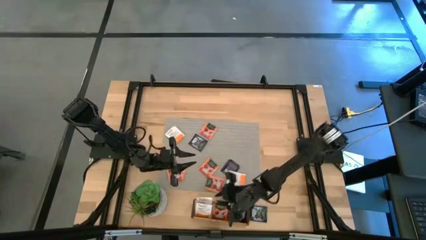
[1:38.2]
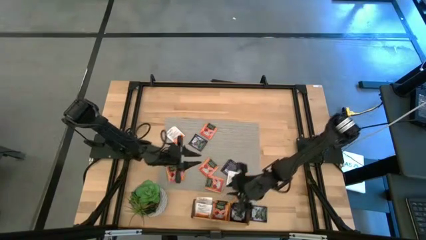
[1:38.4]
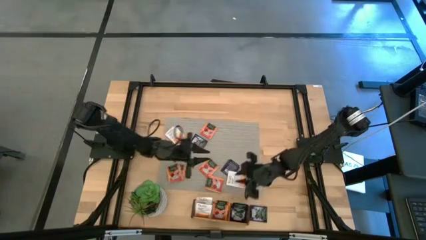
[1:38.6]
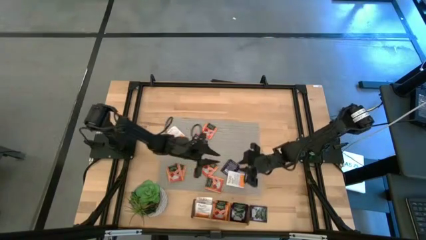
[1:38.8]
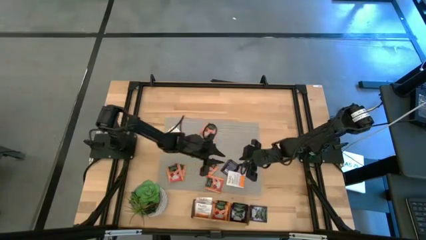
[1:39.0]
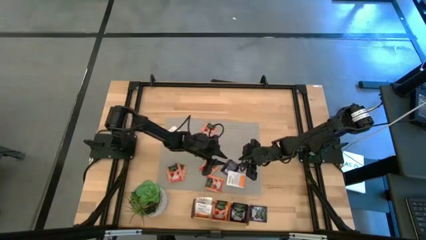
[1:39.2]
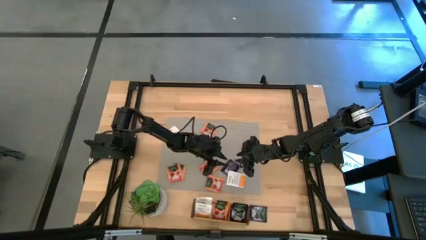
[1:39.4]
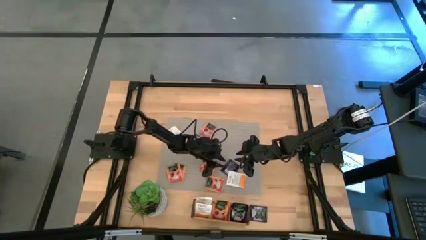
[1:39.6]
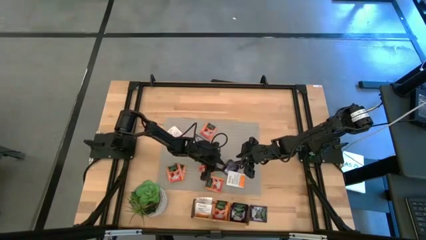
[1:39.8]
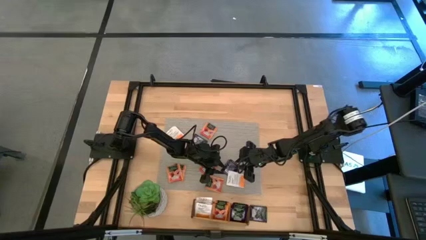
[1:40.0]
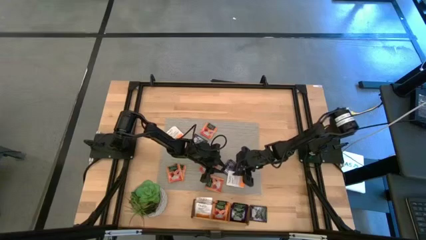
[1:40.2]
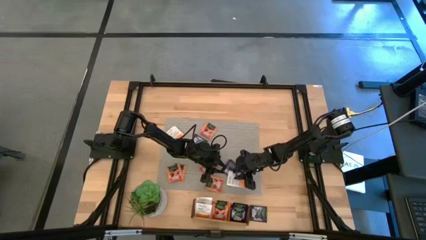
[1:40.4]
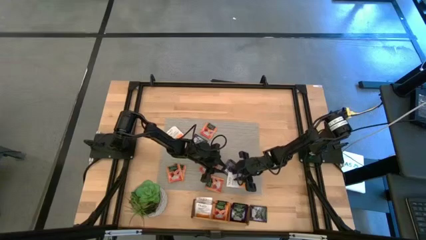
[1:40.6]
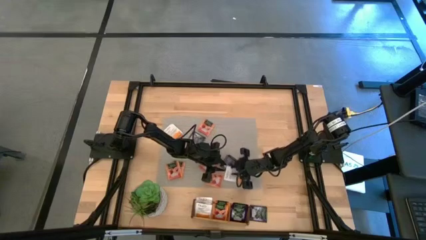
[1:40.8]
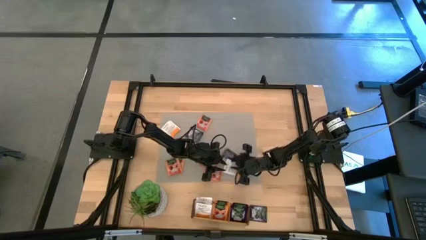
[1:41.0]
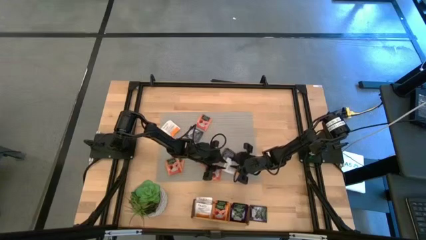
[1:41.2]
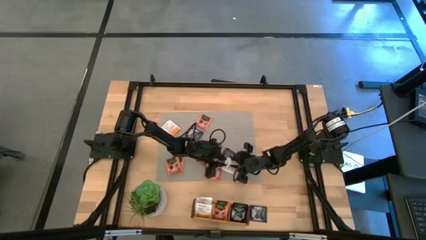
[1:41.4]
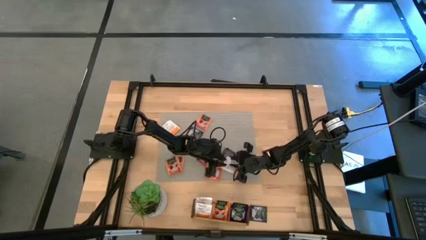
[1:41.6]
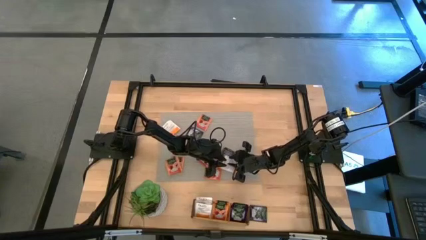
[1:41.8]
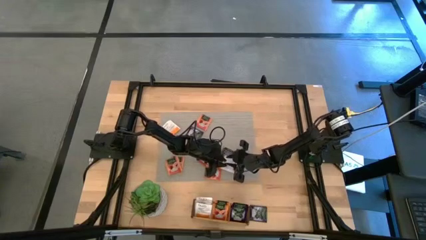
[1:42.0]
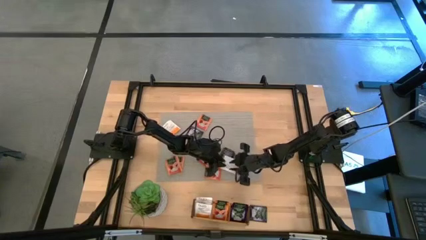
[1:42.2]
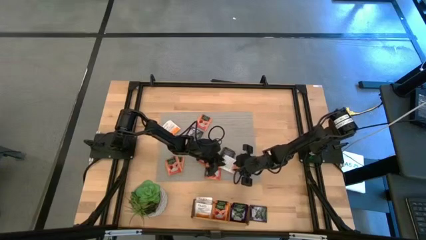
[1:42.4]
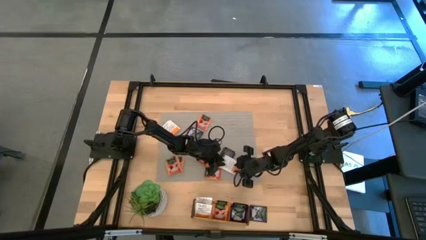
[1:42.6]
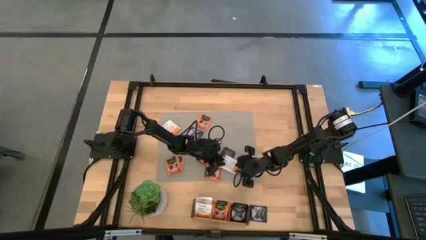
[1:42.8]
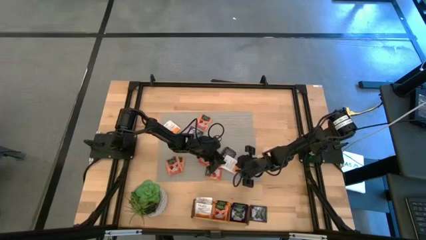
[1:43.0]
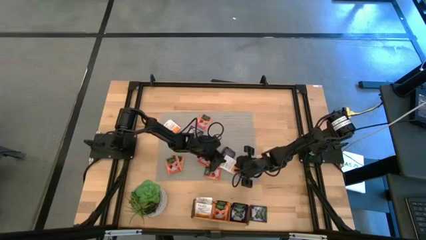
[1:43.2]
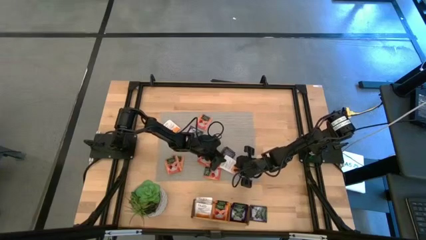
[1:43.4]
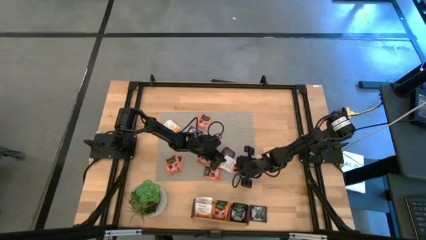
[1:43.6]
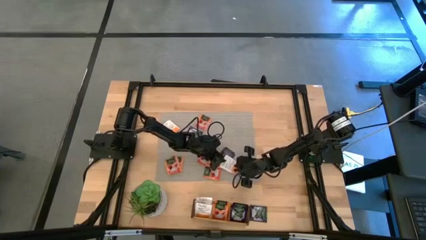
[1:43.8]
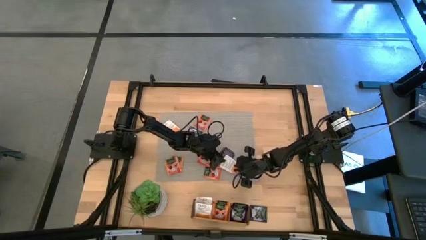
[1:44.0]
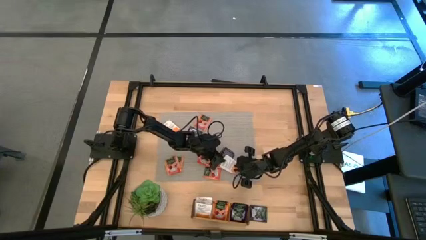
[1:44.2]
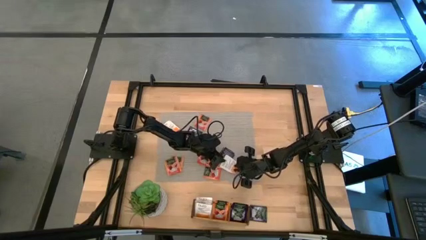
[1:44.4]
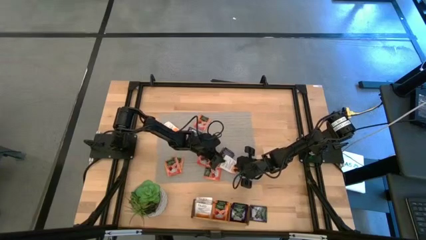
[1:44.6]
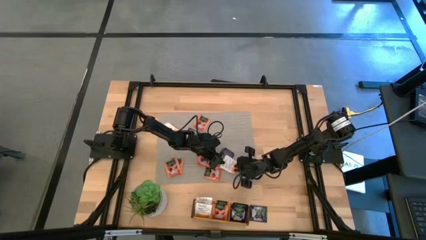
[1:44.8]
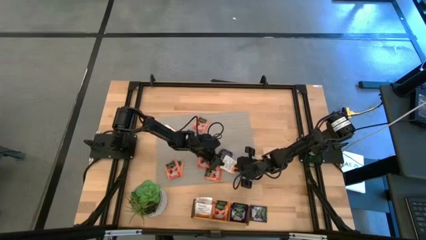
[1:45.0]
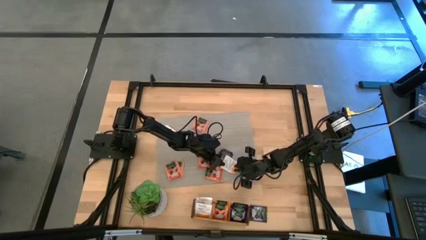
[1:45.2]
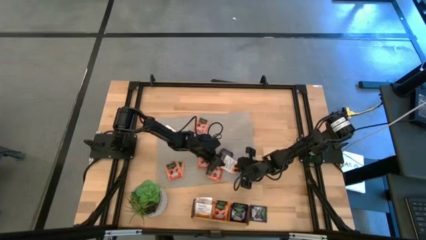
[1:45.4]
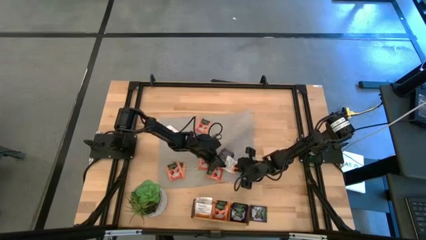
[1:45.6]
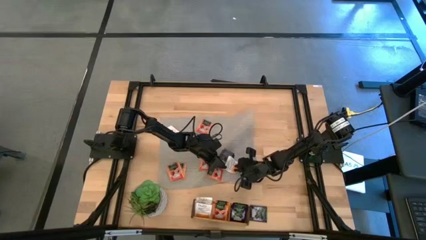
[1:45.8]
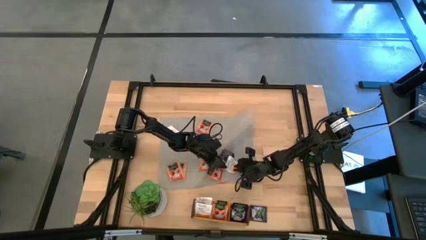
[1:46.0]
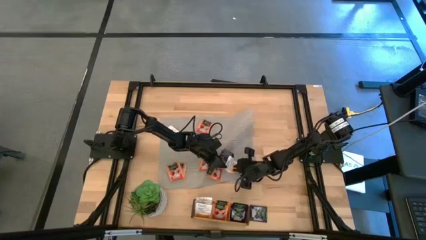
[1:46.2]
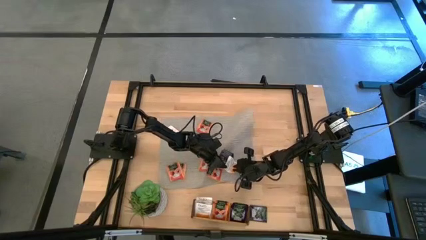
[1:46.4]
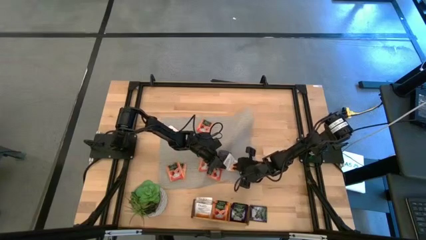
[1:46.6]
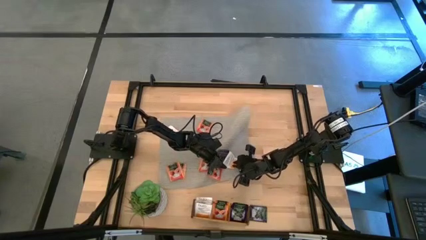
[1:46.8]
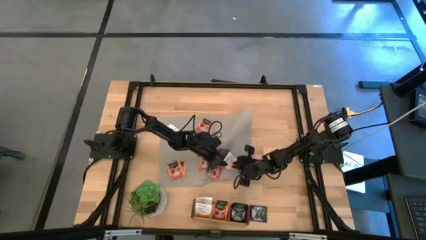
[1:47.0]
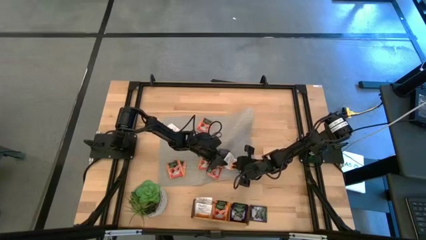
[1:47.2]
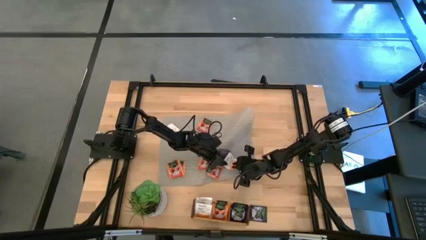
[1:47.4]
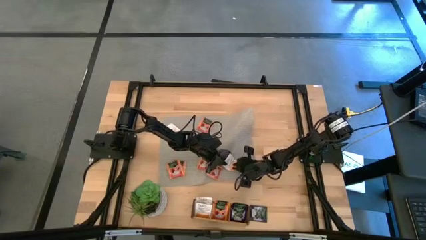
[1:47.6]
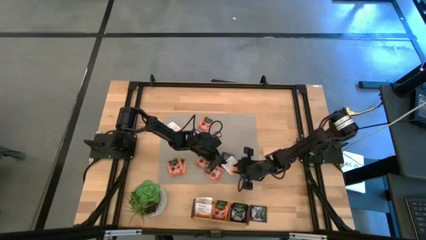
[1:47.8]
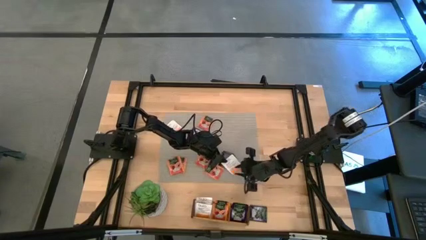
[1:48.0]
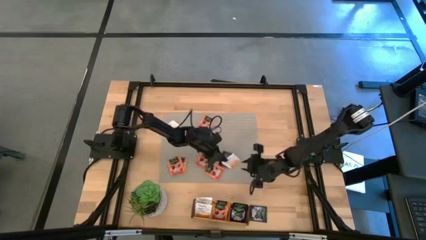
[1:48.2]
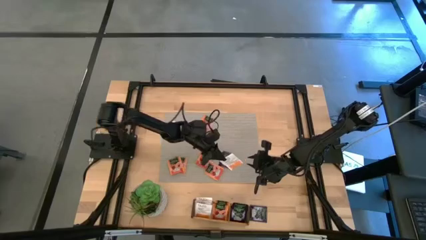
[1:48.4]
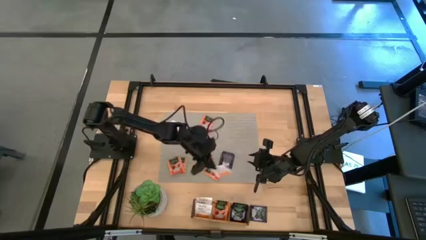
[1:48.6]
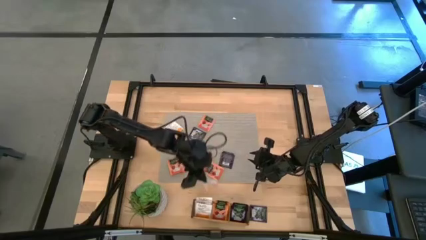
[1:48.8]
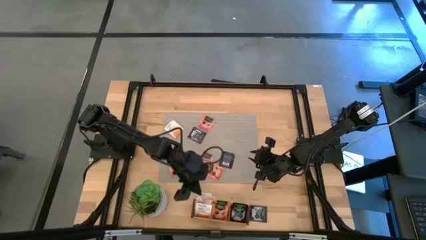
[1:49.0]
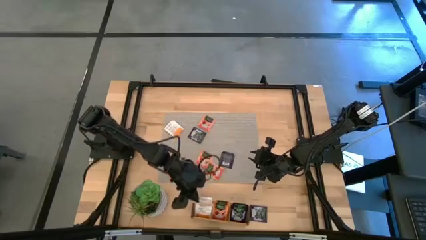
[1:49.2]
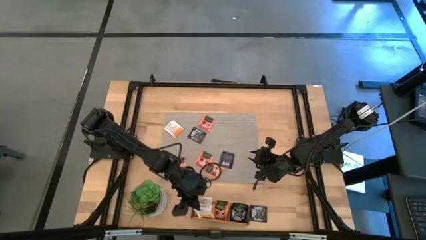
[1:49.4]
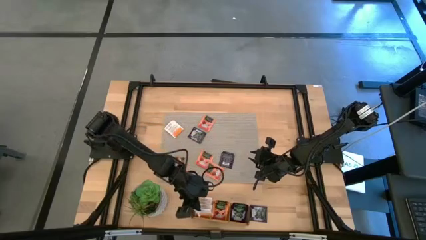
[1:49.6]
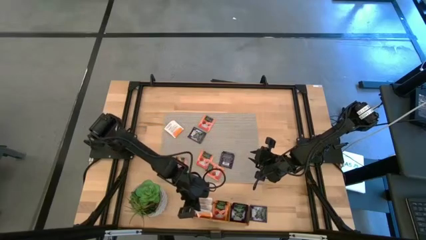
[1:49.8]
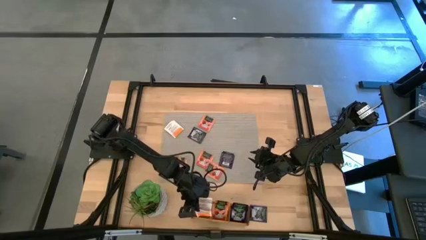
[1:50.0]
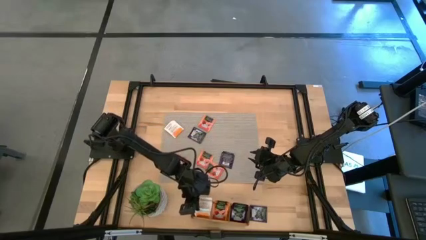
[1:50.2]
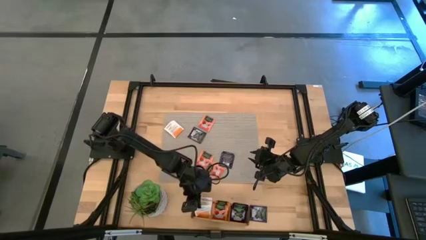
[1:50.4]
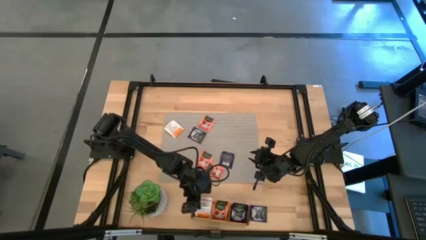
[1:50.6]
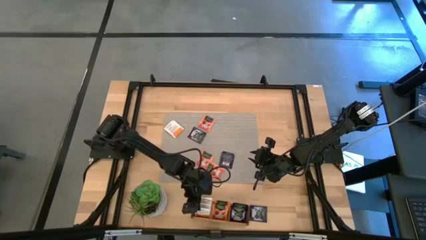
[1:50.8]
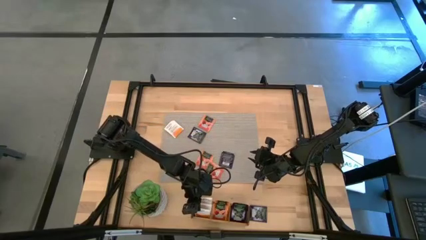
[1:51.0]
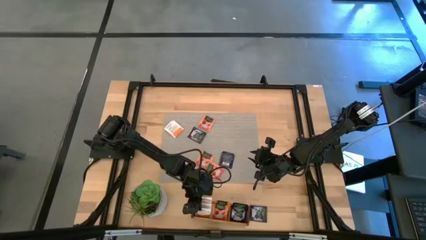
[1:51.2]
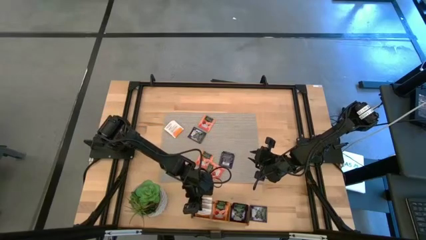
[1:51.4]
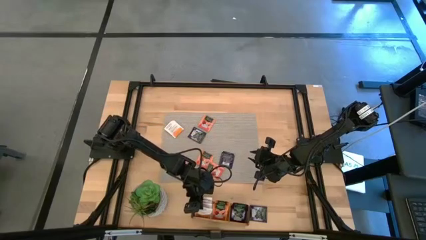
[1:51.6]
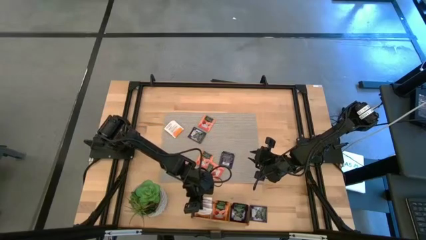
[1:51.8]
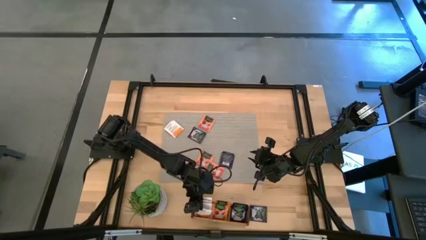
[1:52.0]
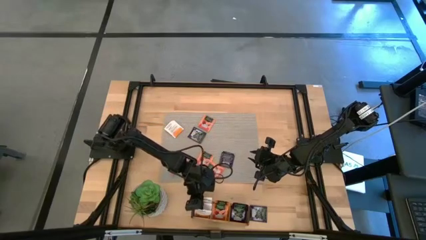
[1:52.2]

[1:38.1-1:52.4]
Task: Pick & Place Tea
Put the white and orange tea bag into the left section of the wooden organizer

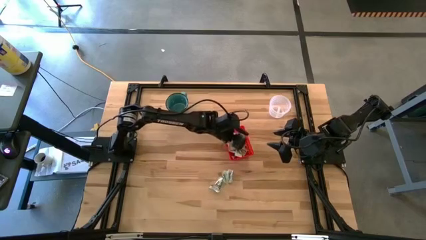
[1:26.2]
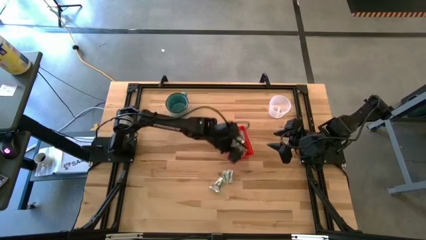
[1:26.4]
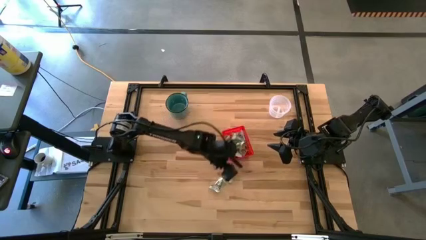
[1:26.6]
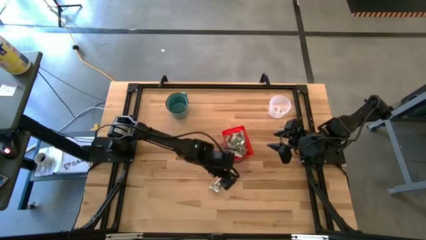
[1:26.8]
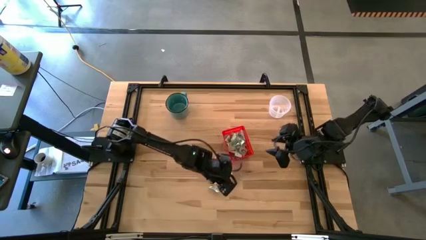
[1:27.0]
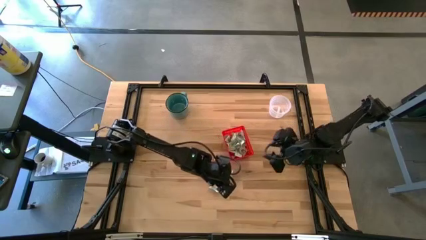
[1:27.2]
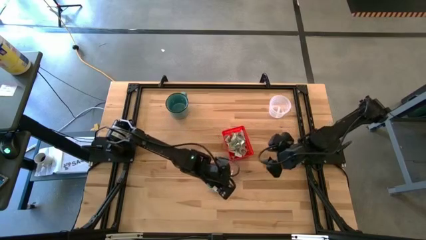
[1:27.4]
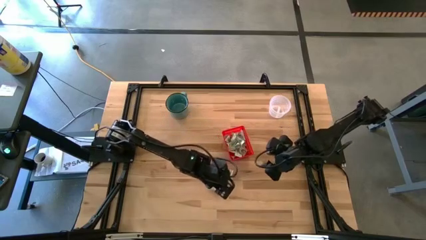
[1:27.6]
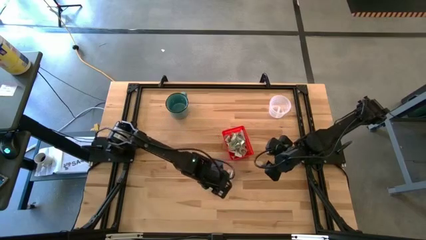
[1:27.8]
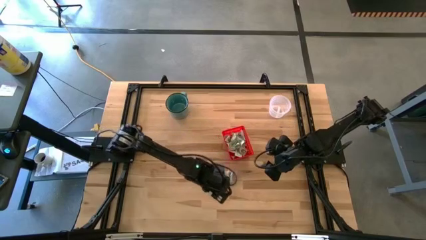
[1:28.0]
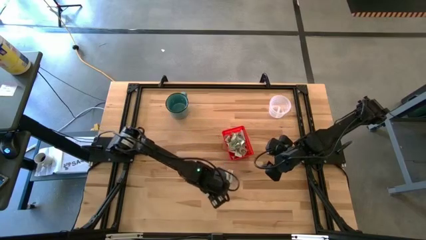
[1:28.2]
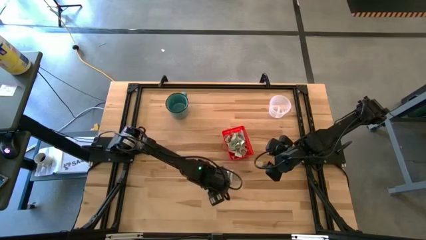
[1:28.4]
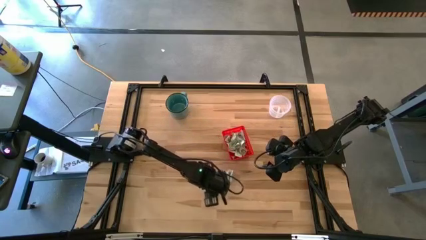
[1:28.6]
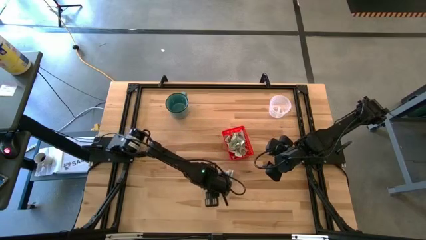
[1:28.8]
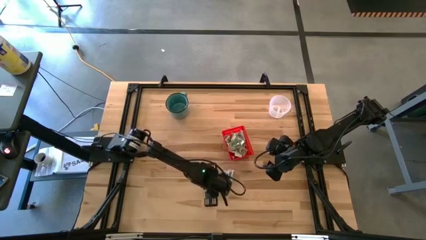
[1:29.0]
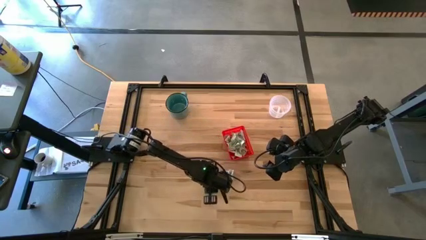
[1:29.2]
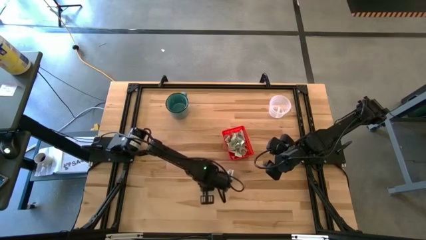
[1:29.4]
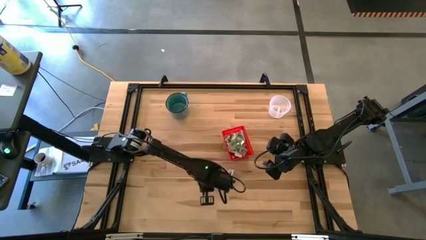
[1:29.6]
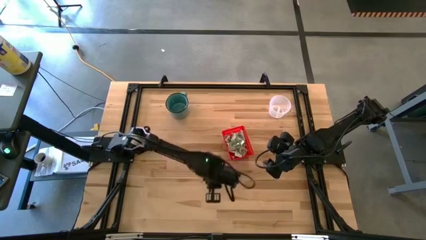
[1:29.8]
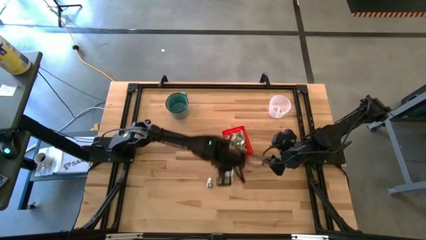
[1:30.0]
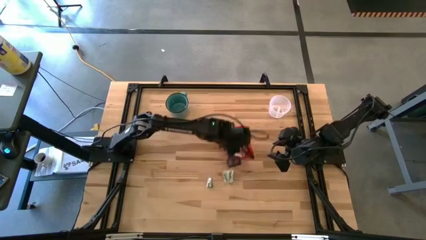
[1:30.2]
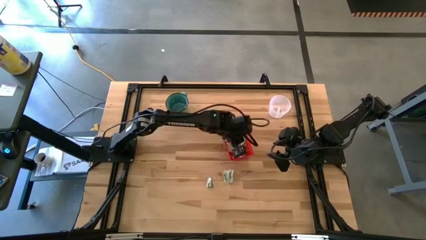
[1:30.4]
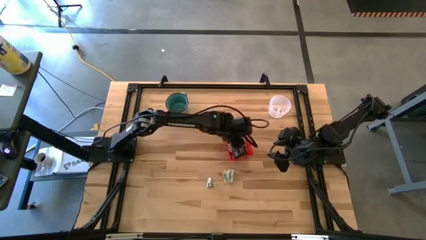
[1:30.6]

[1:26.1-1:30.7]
Task: Pick and place items into bin
Put the stevia packet into the orange bin
